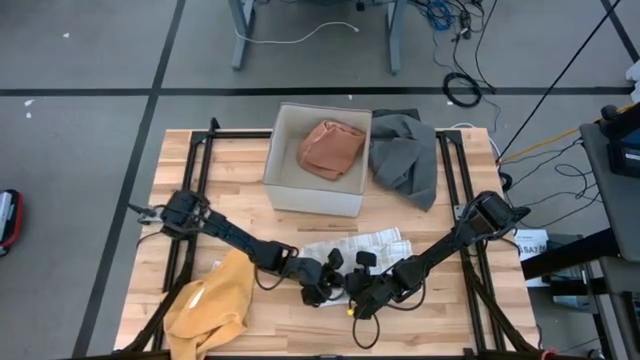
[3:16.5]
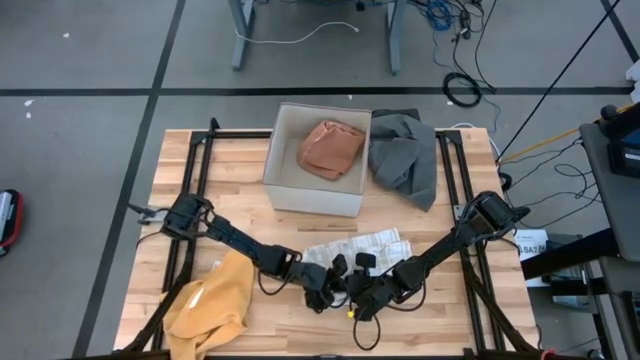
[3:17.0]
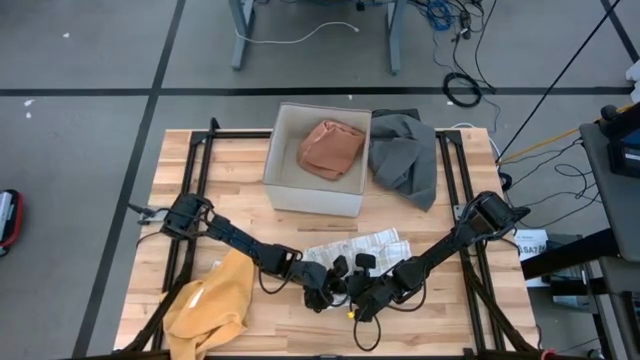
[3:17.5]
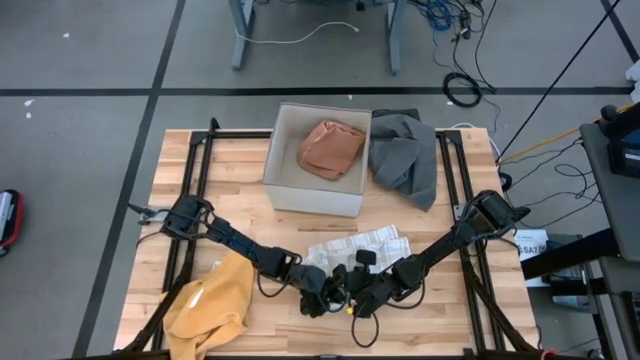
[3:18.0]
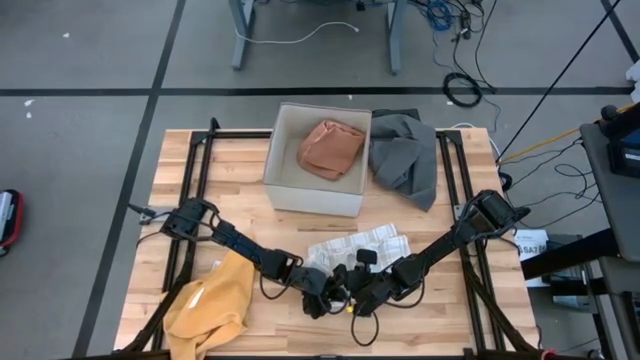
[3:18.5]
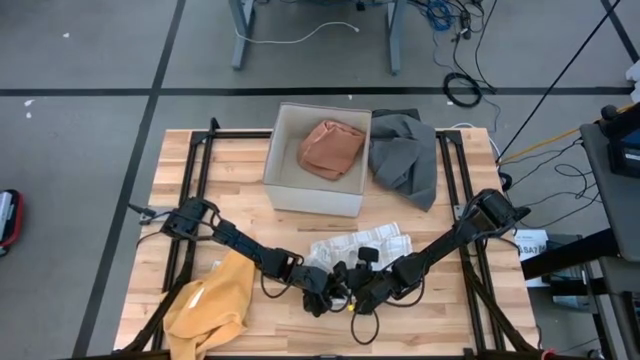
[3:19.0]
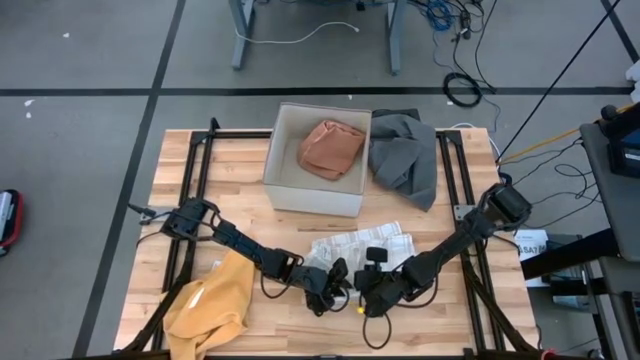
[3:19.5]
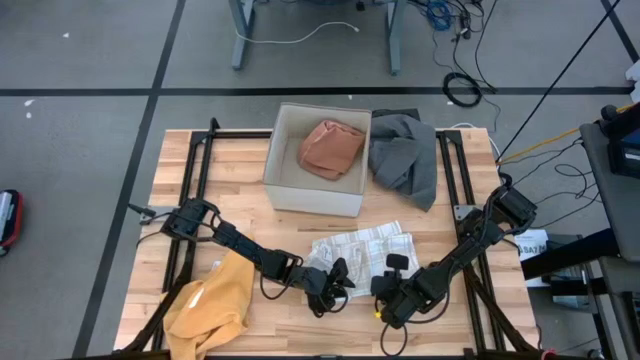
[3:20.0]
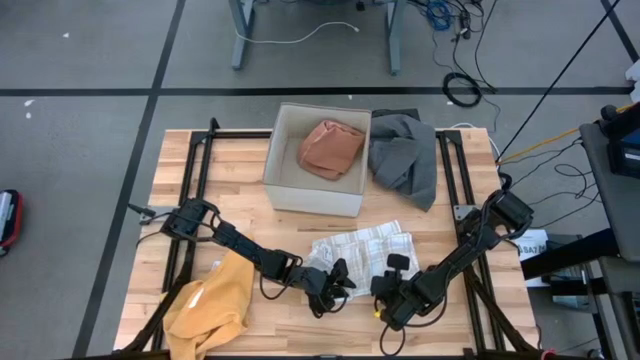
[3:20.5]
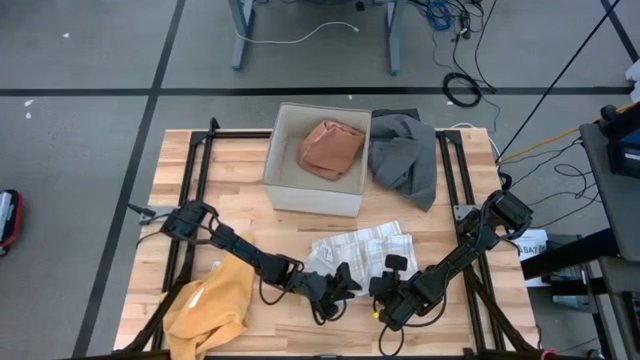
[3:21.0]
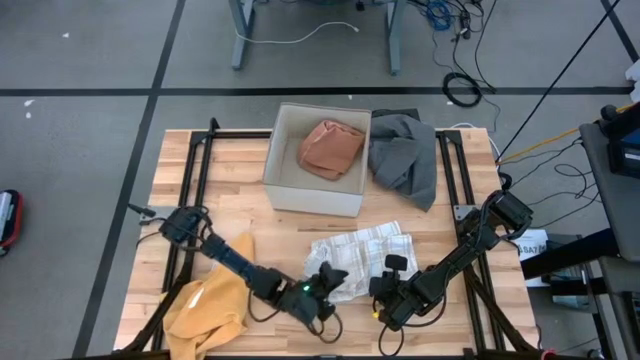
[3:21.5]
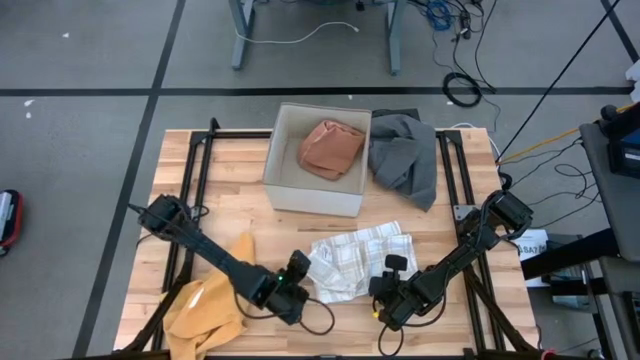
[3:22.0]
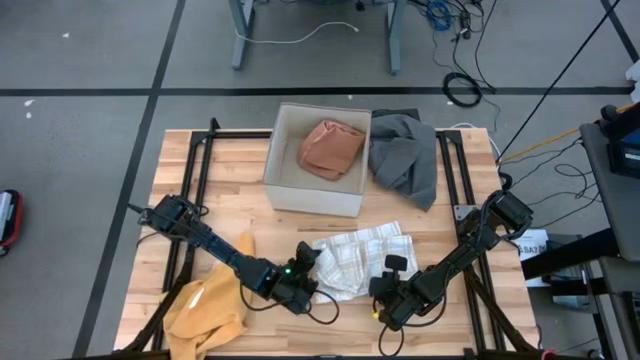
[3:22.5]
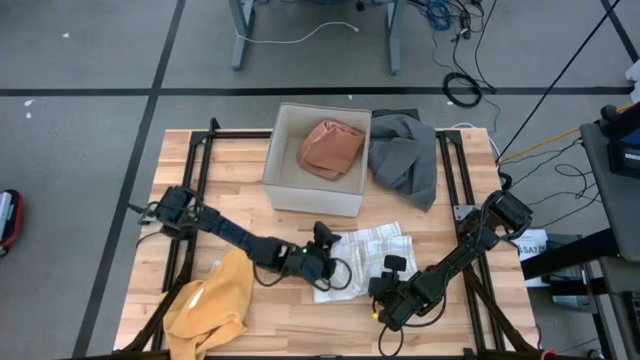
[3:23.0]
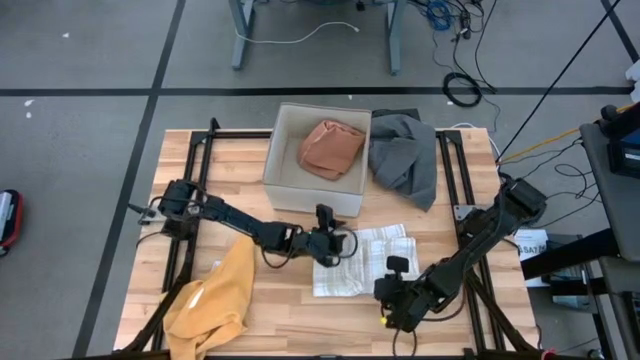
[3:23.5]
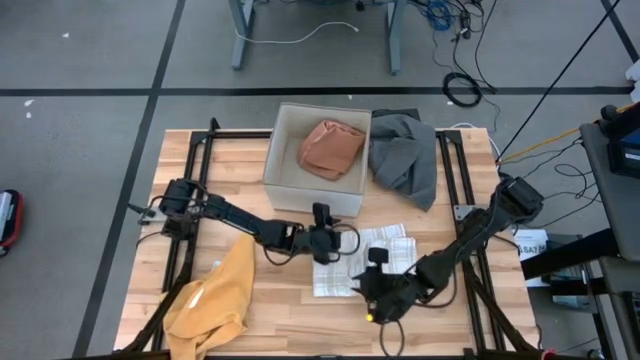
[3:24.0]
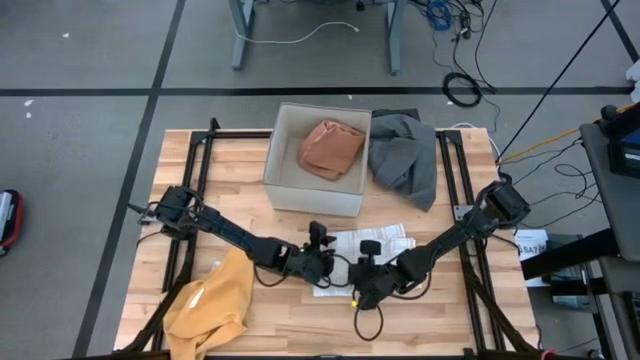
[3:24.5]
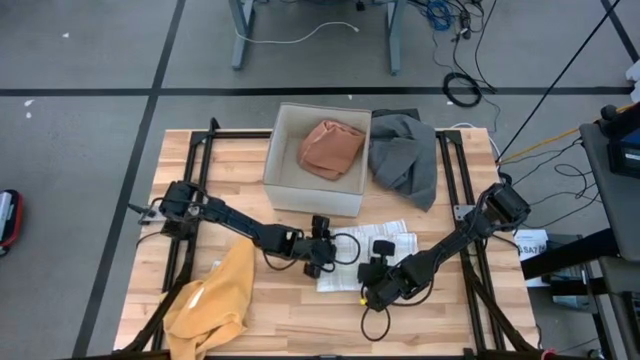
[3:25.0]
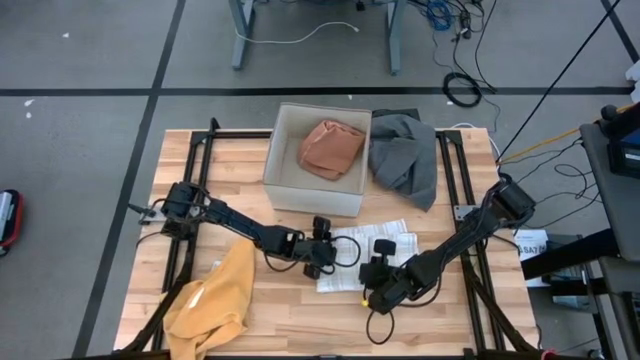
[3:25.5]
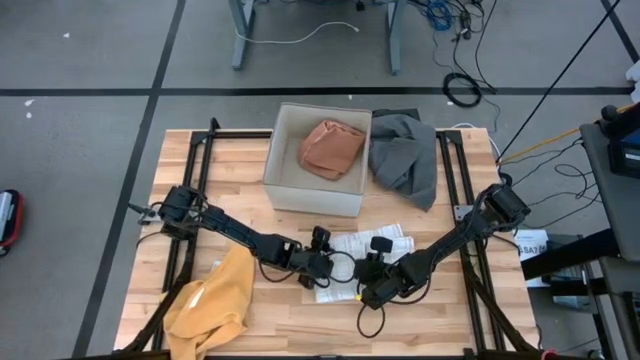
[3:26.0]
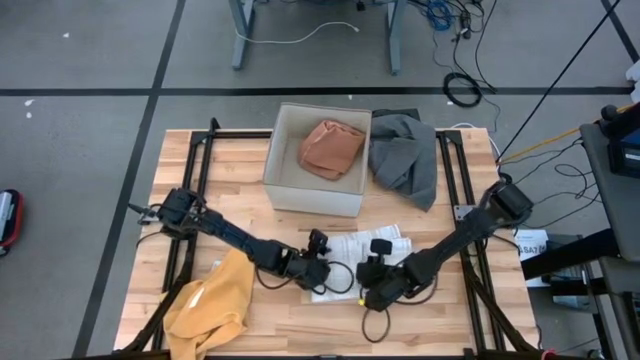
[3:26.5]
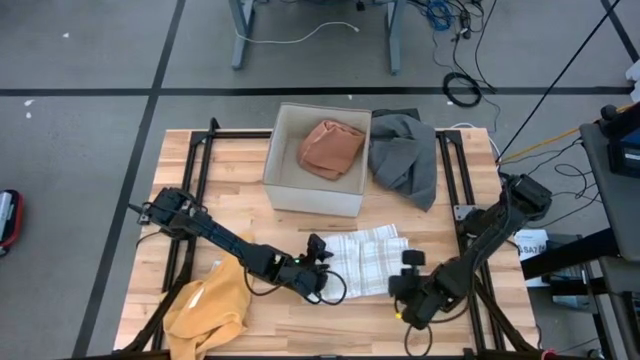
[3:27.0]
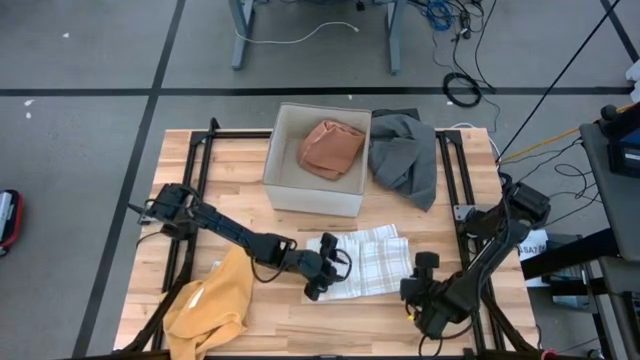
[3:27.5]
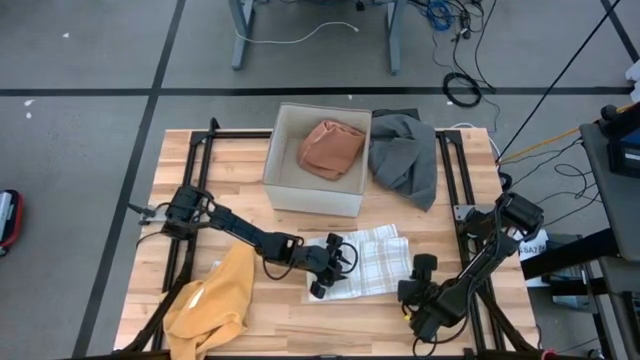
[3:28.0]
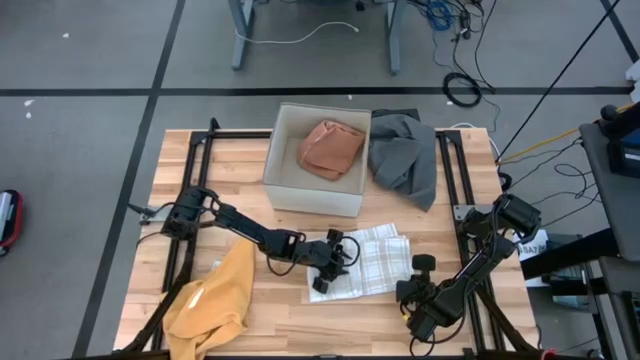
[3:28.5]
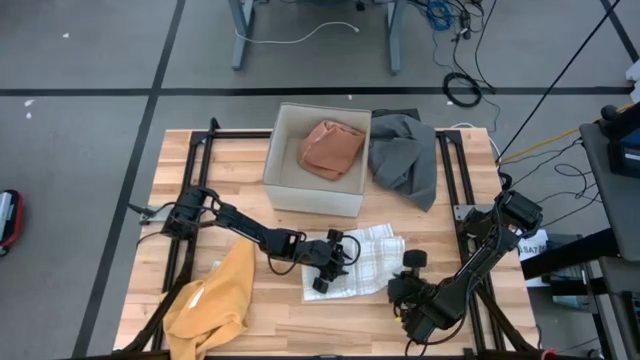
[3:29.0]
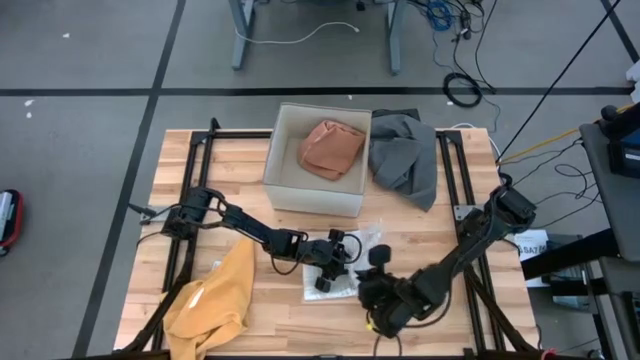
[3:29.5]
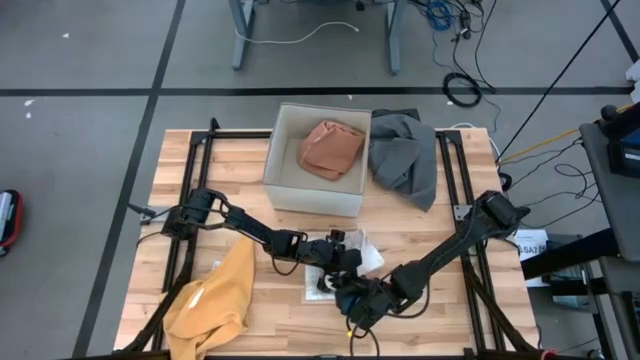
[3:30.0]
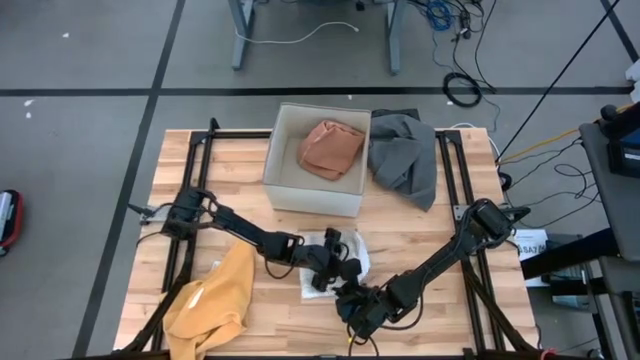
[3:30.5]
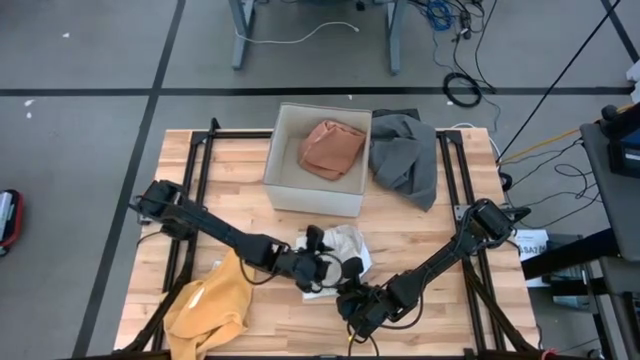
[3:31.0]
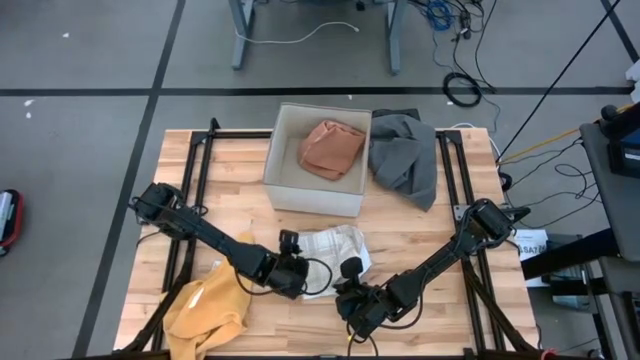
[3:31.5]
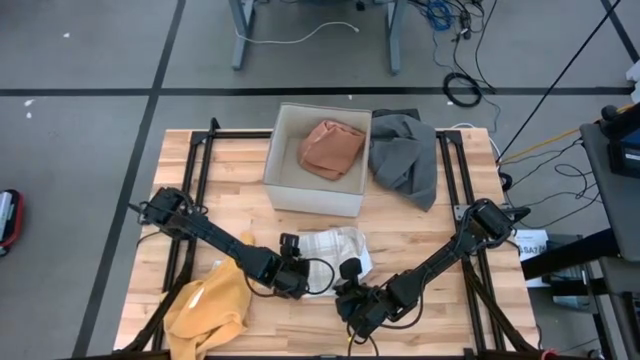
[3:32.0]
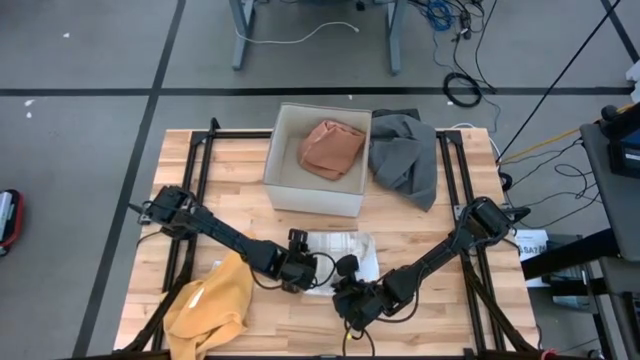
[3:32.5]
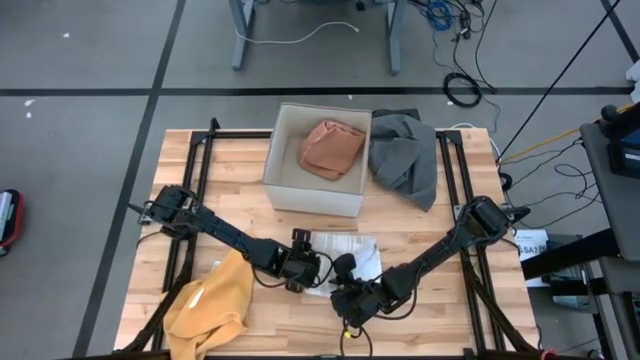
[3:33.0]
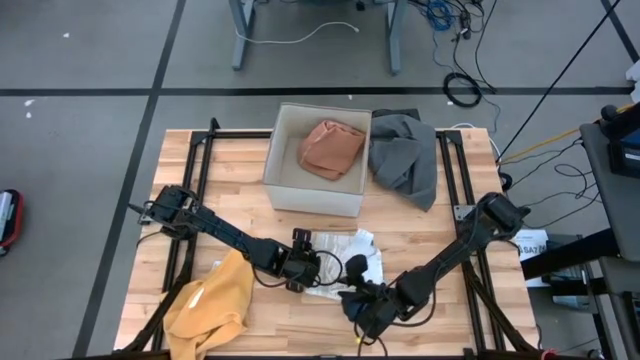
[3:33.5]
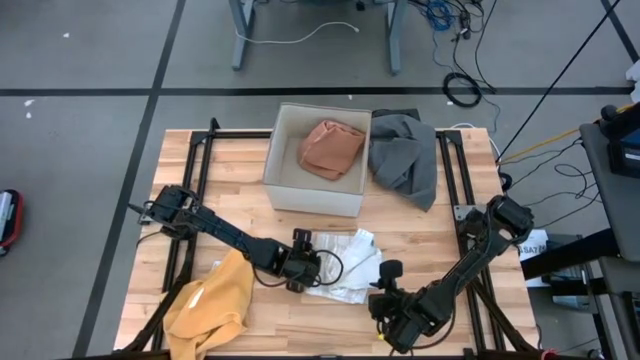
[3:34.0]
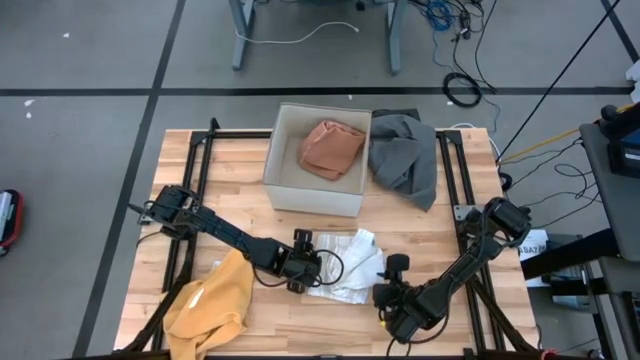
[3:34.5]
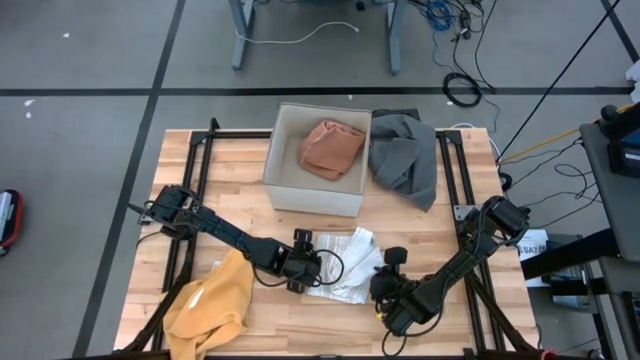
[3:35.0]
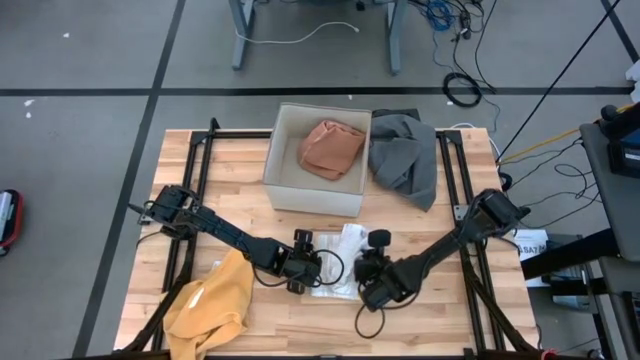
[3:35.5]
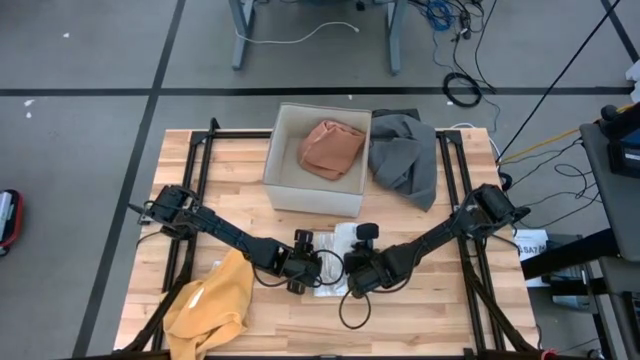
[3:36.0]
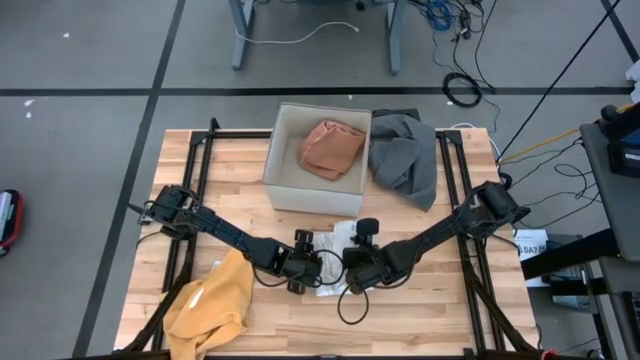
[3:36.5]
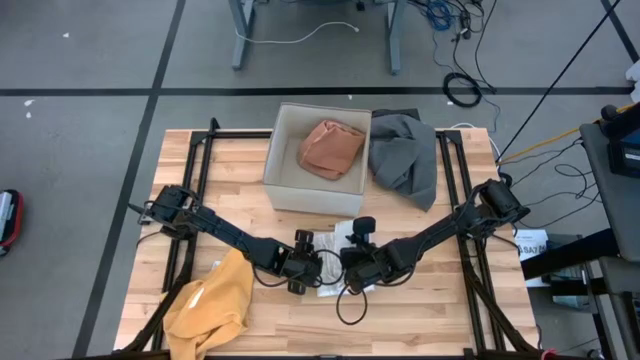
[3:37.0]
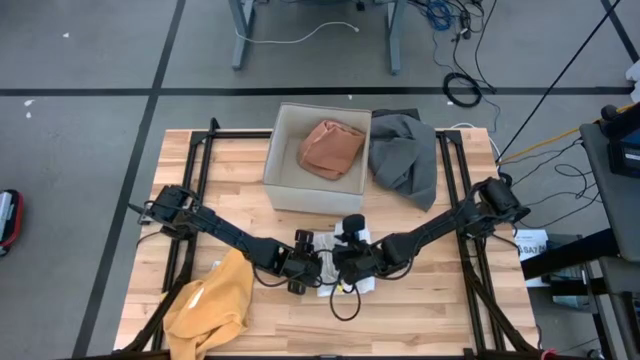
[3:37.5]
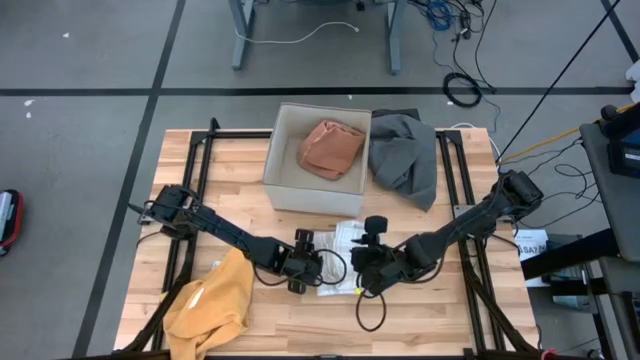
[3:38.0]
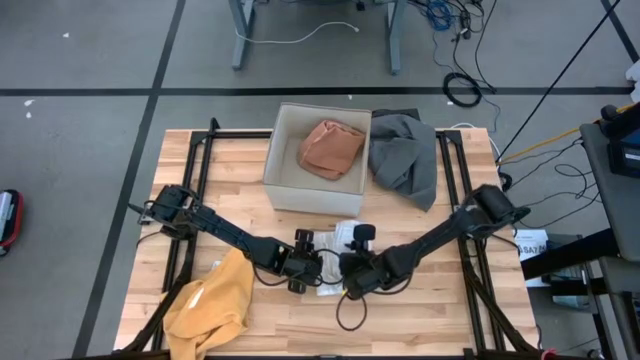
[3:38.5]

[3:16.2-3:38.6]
Task: Fold towel
Fold the white towel
